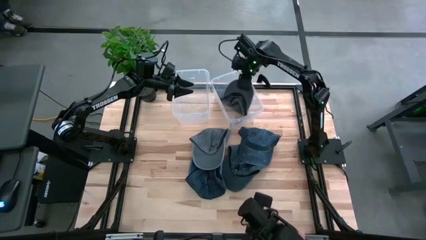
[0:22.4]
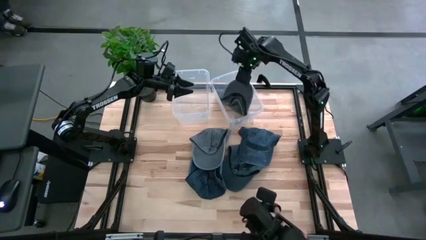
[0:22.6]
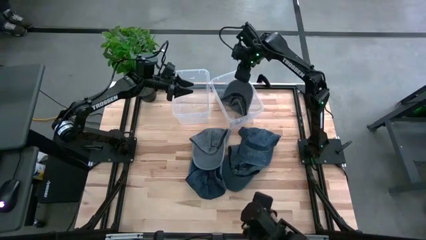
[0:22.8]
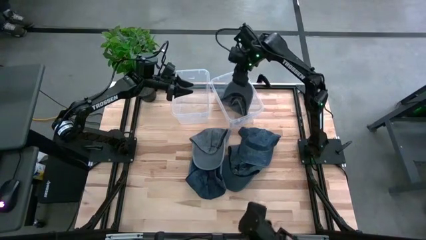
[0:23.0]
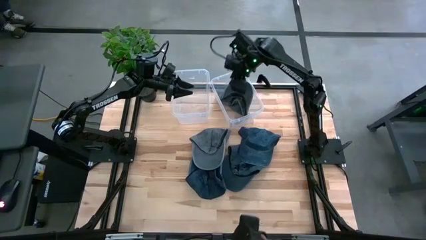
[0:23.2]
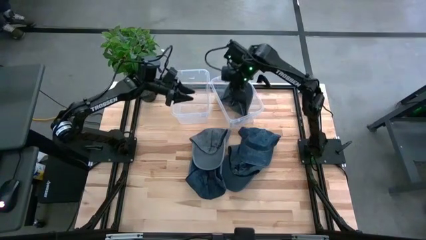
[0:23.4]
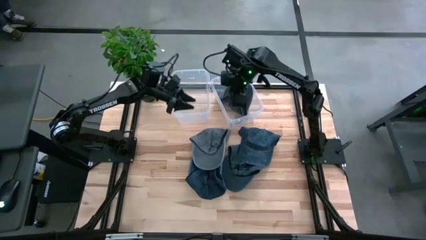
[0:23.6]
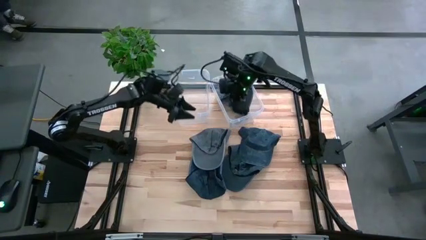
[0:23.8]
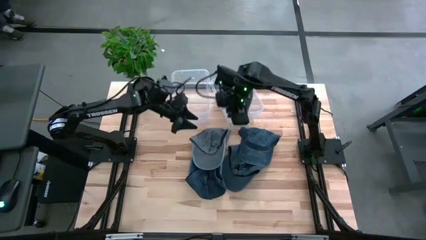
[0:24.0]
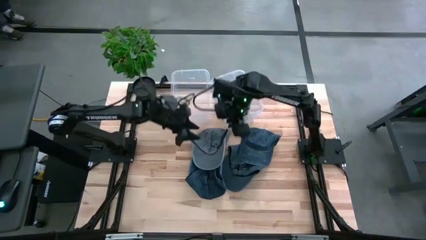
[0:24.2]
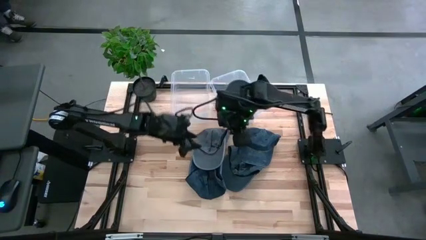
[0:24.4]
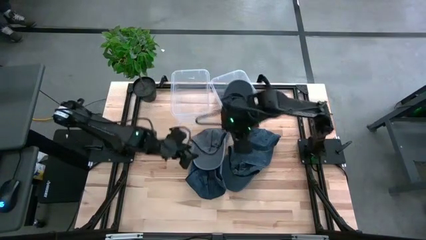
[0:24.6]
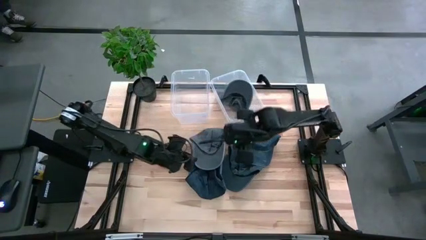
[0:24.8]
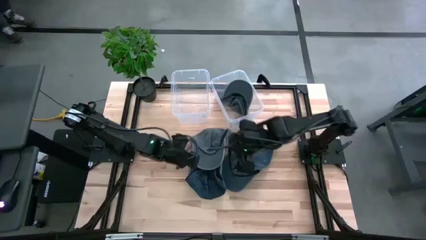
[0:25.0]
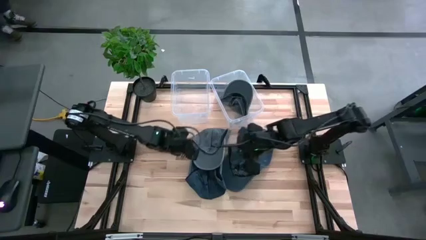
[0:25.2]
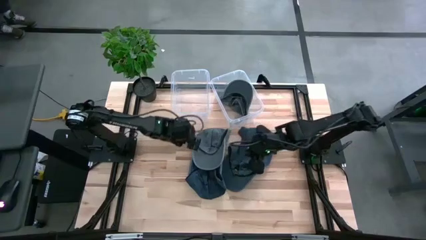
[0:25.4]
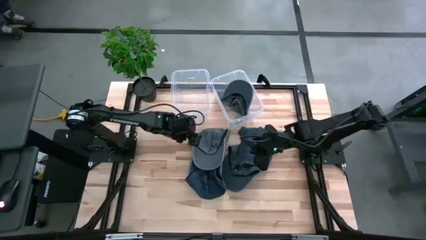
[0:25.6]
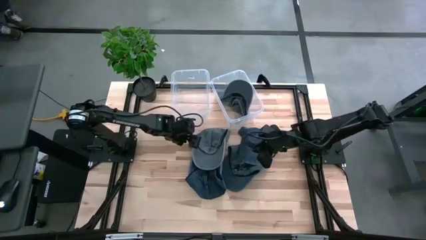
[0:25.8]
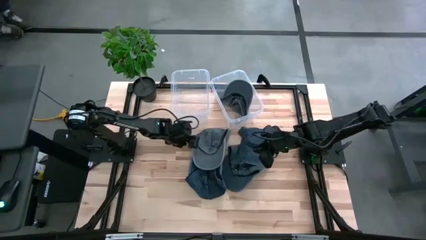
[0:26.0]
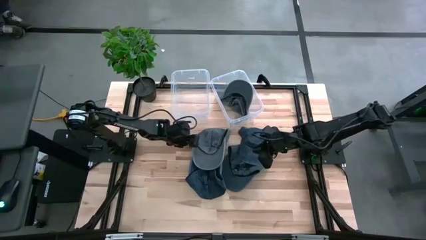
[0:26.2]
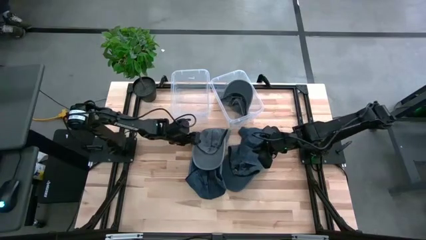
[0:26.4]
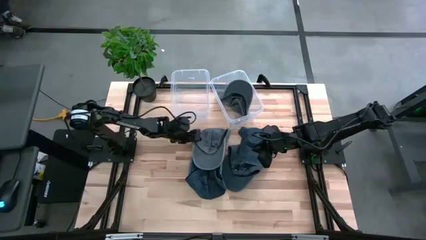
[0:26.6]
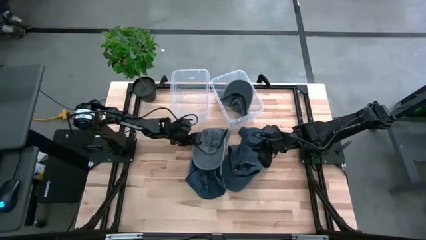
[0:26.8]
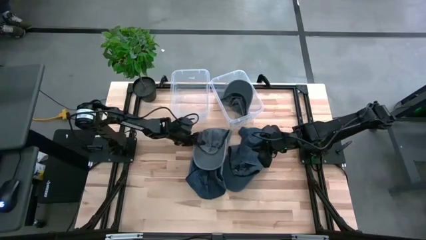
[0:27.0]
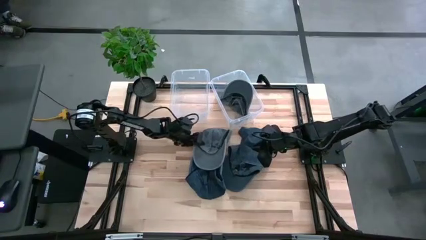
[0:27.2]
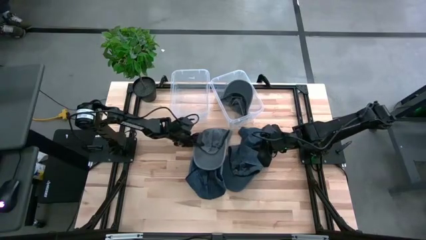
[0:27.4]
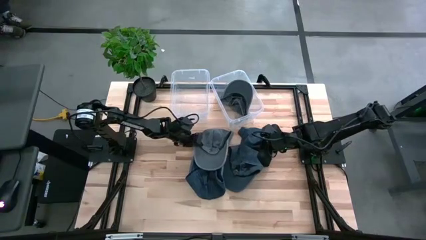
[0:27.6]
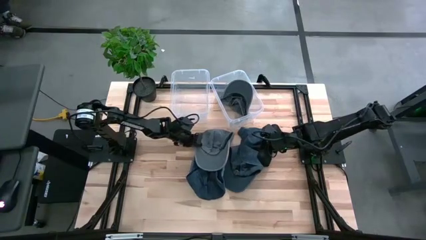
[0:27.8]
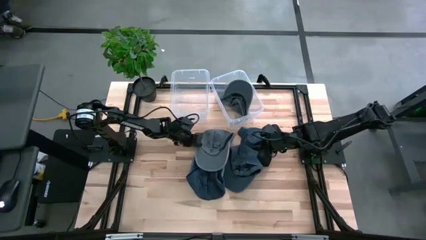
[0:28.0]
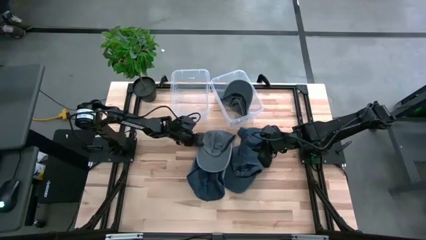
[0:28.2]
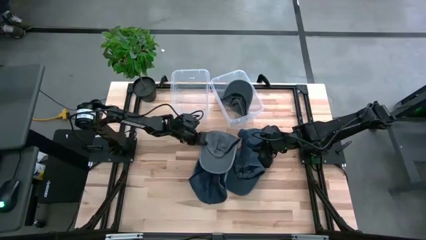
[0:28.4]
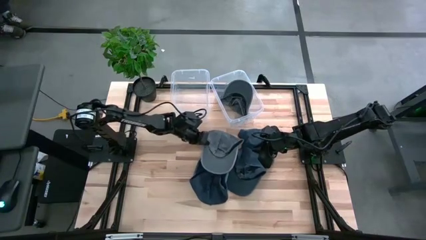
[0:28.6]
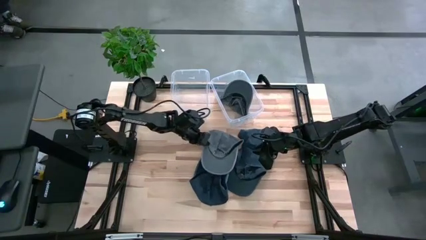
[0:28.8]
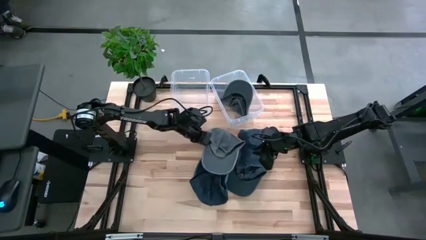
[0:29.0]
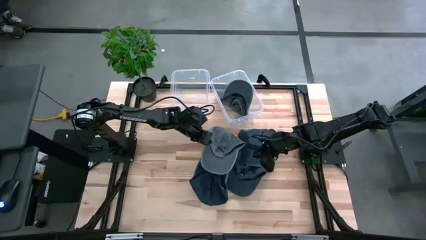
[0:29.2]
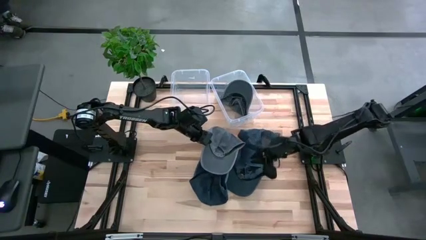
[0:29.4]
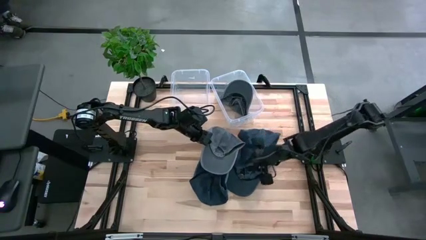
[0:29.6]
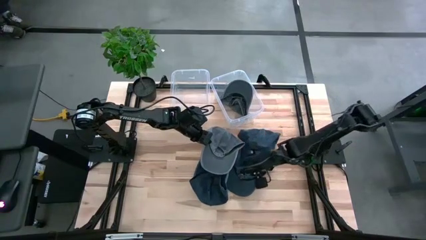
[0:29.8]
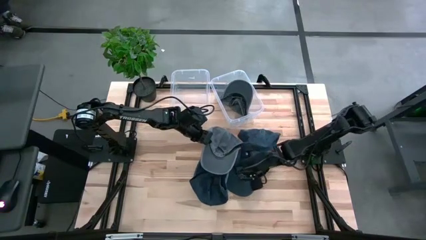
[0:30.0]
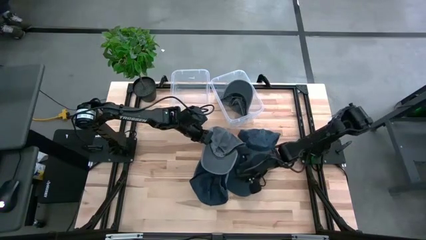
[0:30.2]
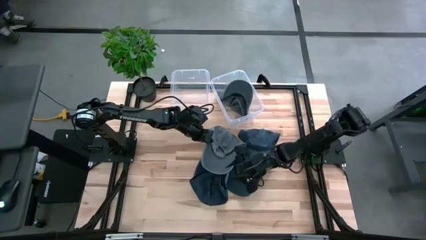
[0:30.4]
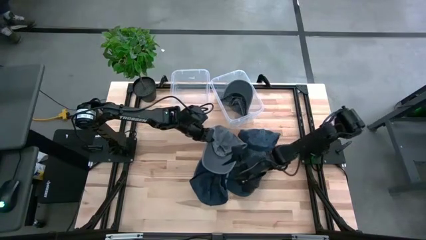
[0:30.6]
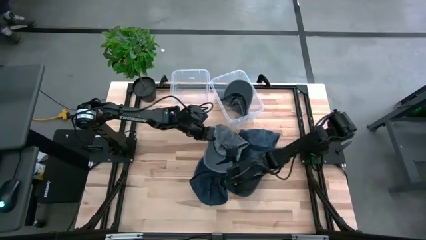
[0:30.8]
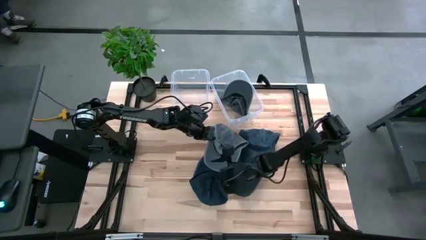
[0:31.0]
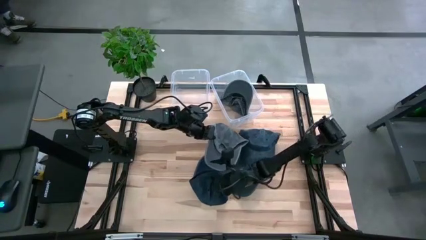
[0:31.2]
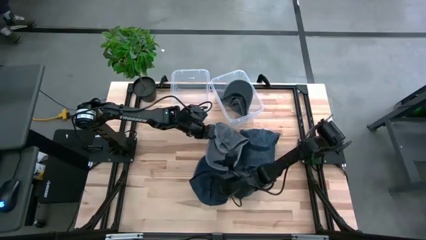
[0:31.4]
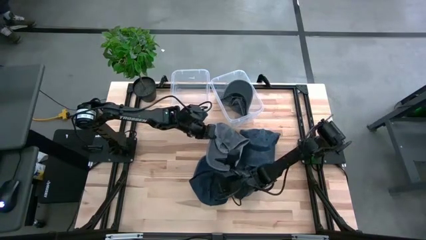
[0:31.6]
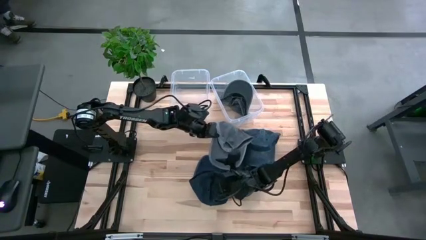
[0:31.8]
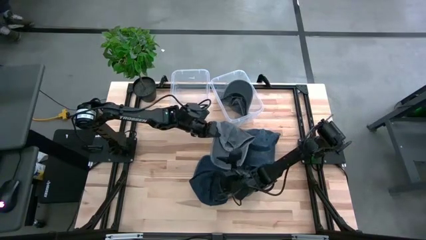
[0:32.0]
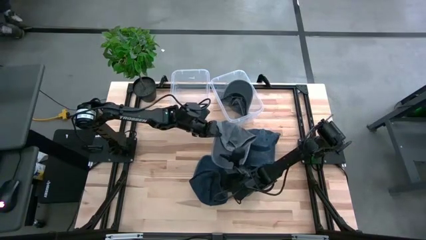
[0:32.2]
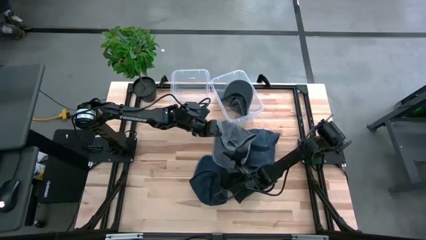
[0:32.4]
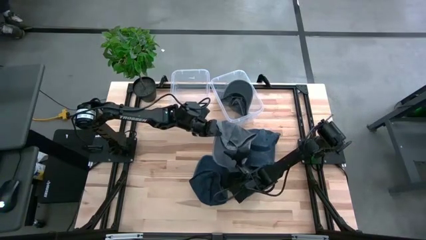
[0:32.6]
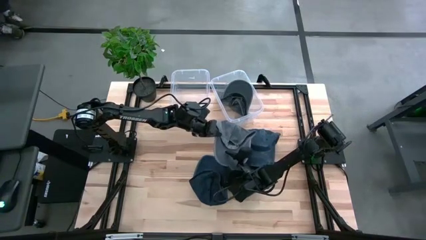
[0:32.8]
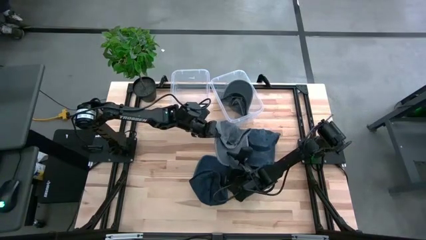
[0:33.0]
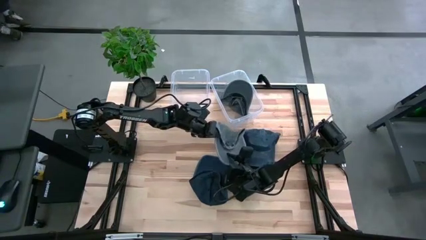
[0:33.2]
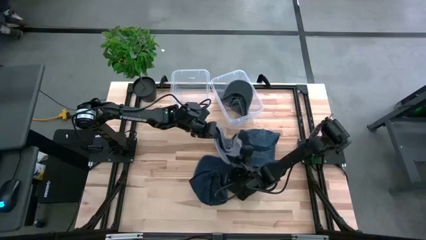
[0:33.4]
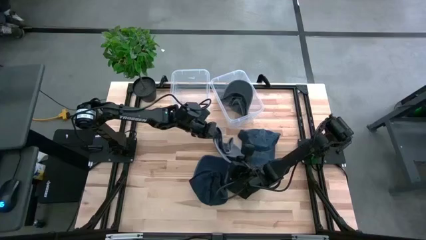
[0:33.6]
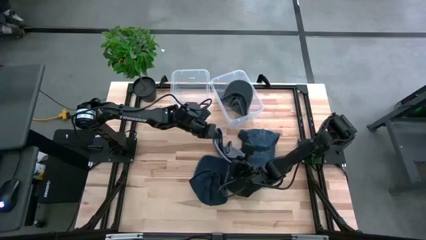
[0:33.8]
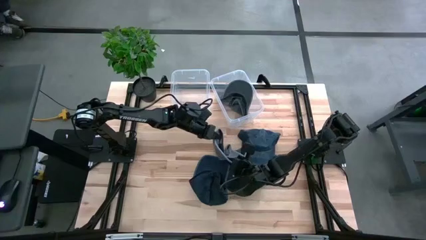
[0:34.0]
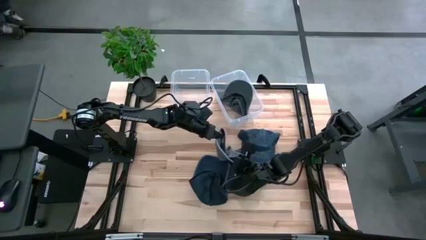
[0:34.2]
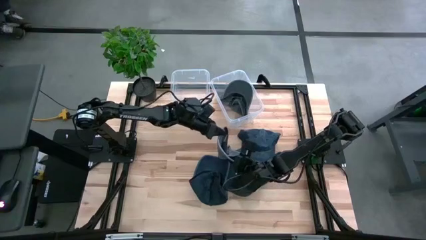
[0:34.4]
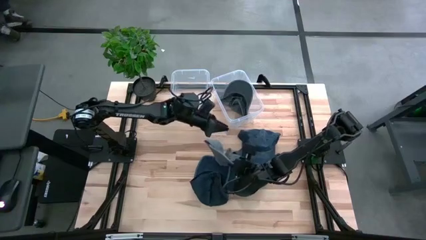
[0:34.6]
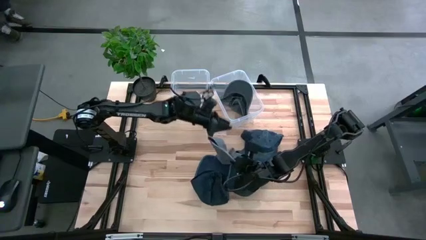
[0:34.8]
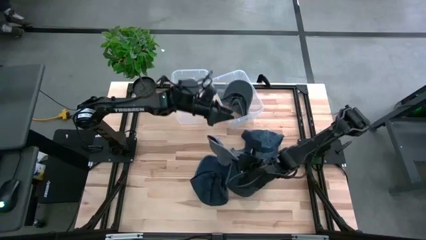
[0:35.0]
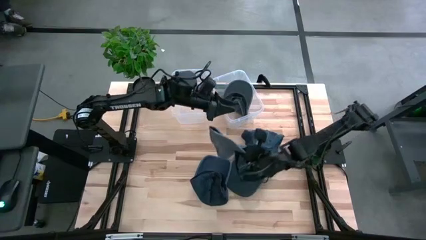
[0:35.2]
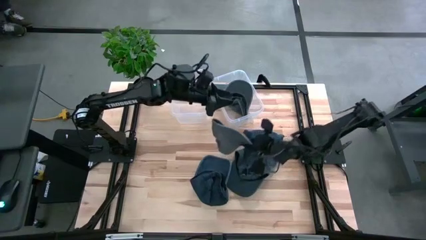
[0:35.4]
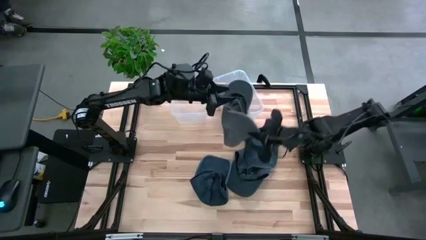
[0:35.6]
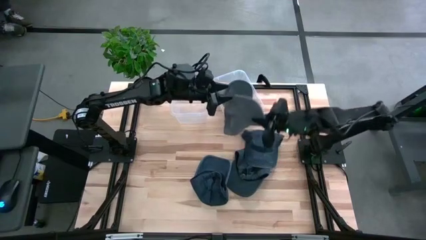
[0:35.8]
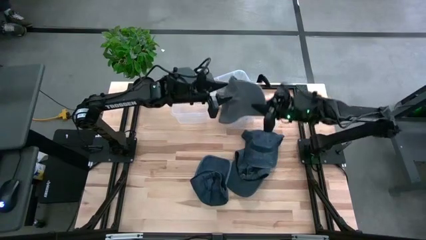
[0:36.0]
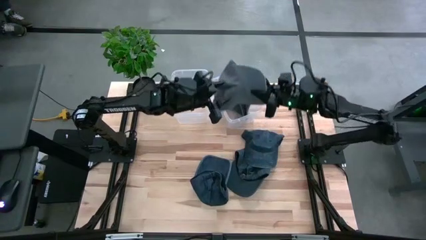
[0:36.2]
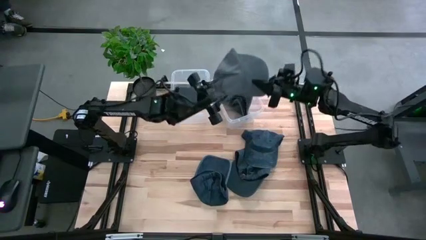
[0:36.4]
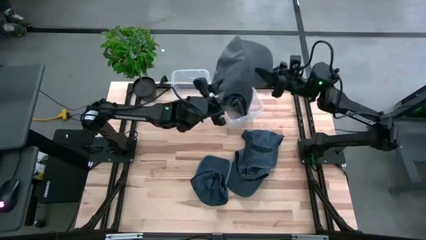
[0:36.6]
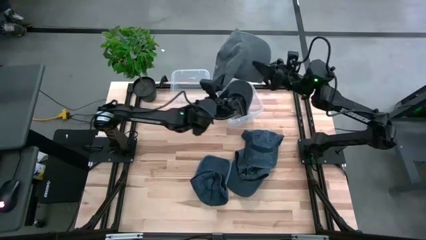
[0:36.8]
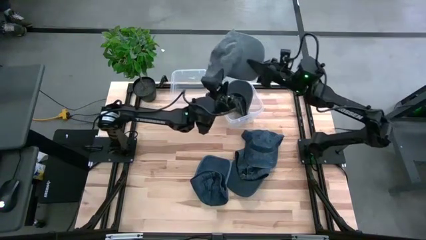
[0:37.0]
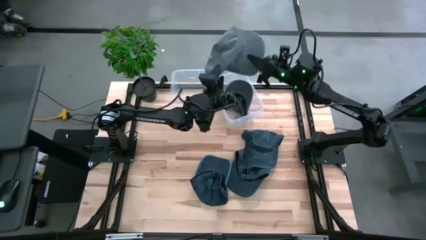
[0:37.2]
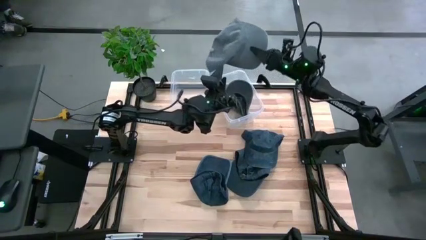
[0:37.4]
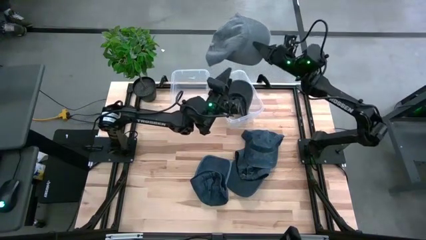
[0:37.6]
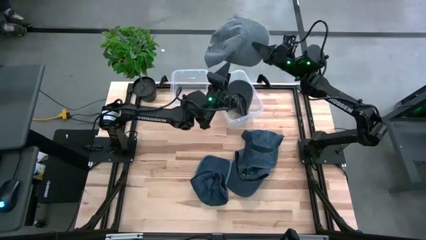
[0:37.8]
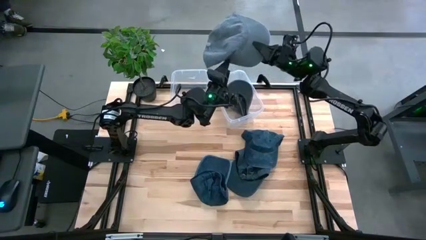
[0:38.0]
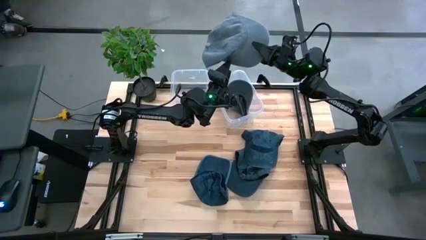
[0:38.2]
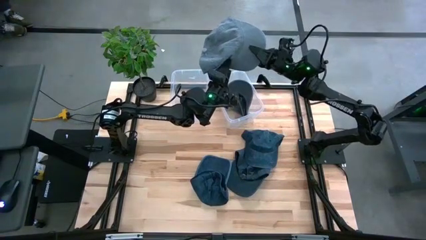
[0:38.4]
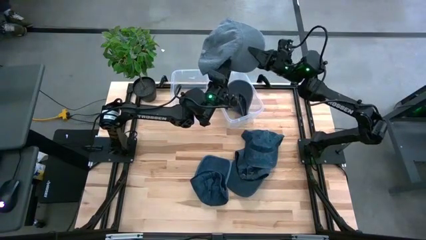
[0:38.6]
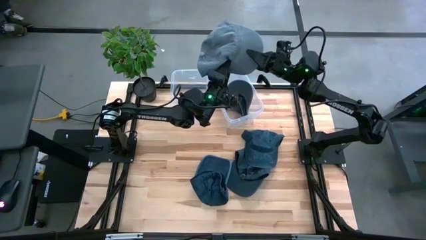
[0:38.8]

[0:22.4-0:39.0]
Task: Pick & Place hat
Put the gray cap into the right transparent bin
